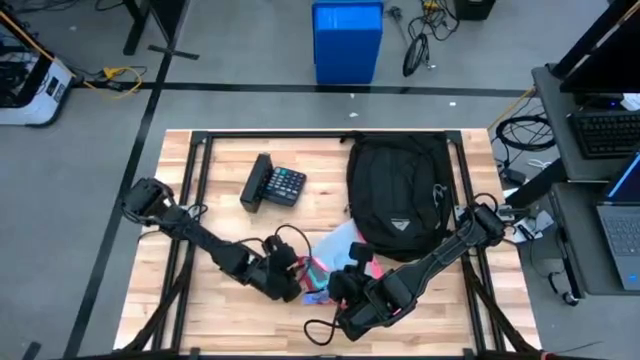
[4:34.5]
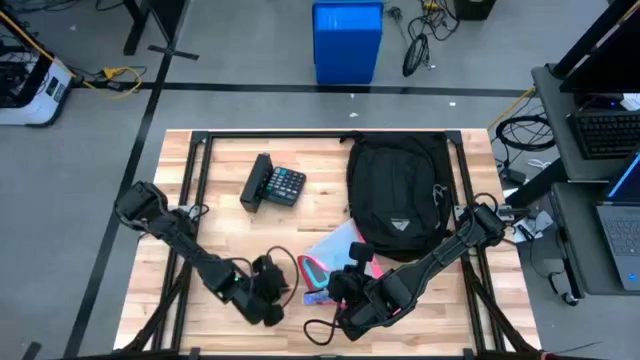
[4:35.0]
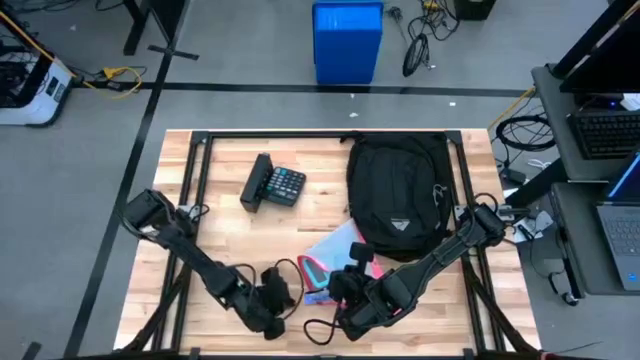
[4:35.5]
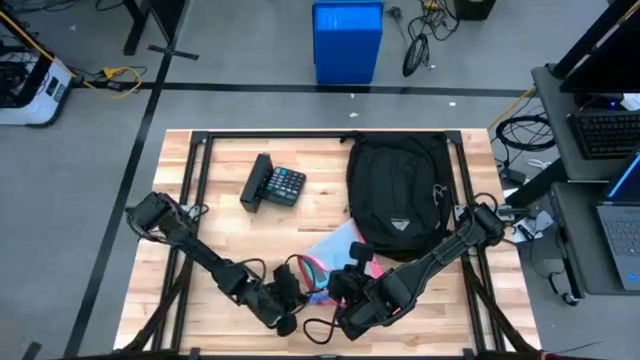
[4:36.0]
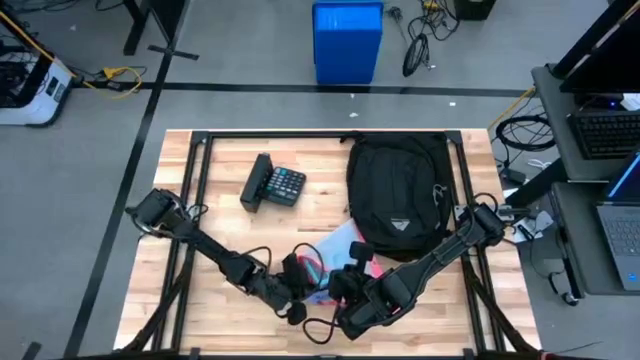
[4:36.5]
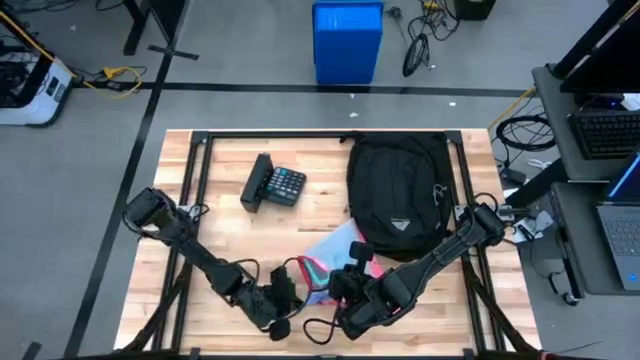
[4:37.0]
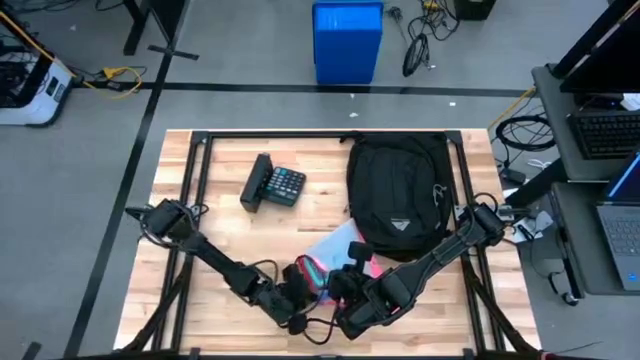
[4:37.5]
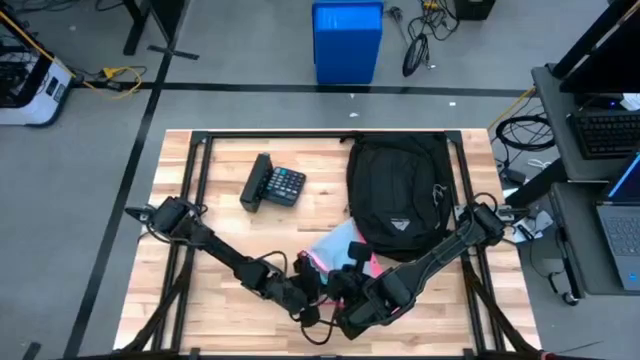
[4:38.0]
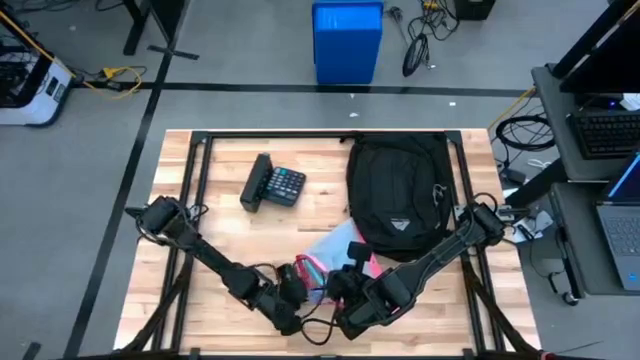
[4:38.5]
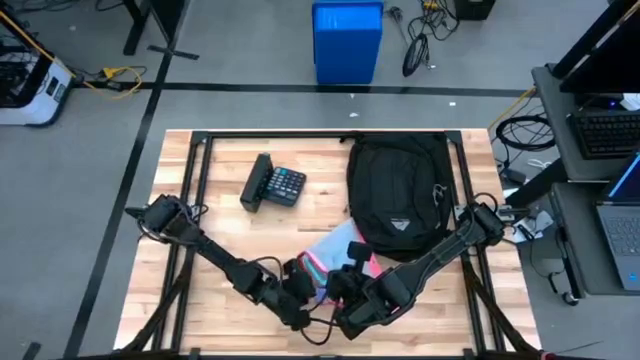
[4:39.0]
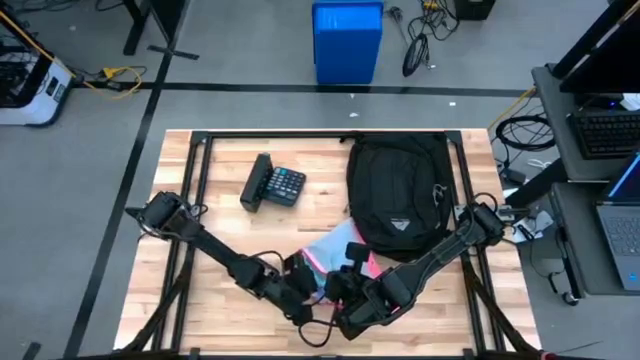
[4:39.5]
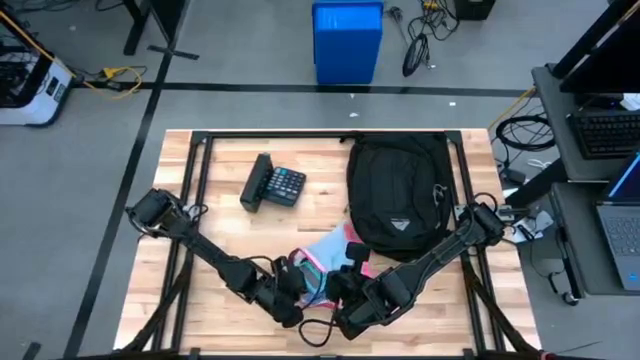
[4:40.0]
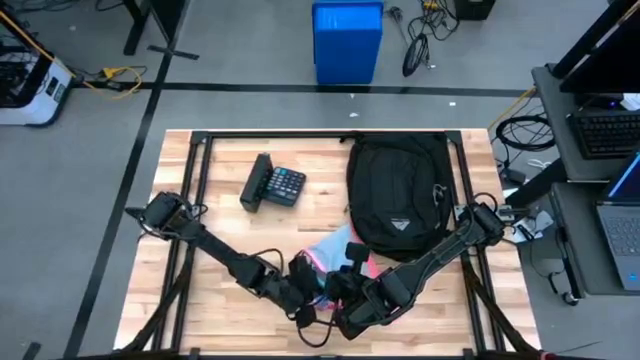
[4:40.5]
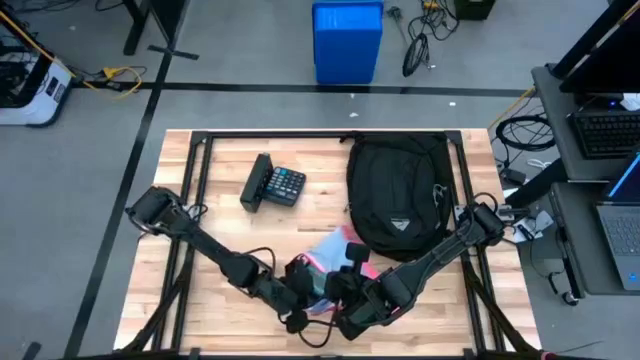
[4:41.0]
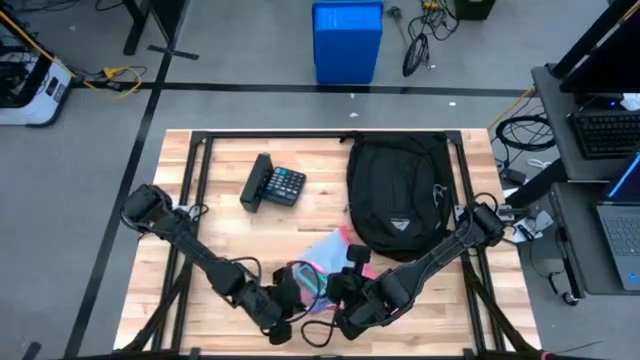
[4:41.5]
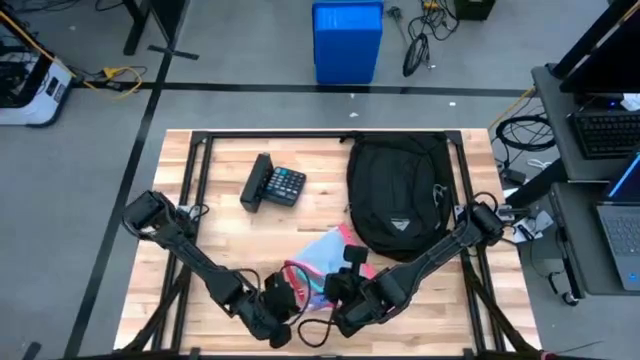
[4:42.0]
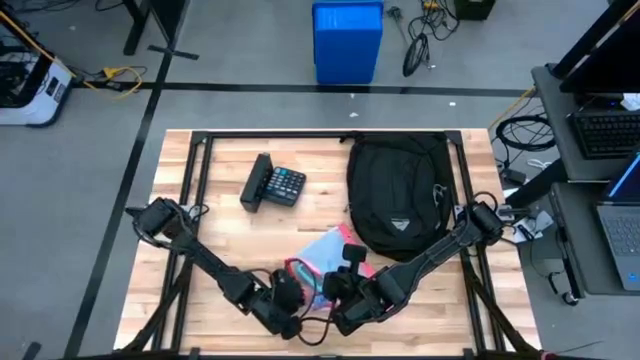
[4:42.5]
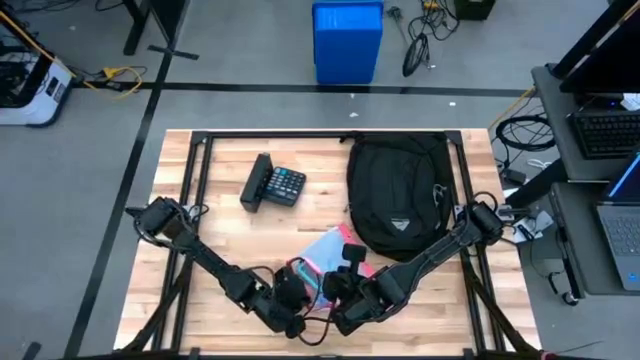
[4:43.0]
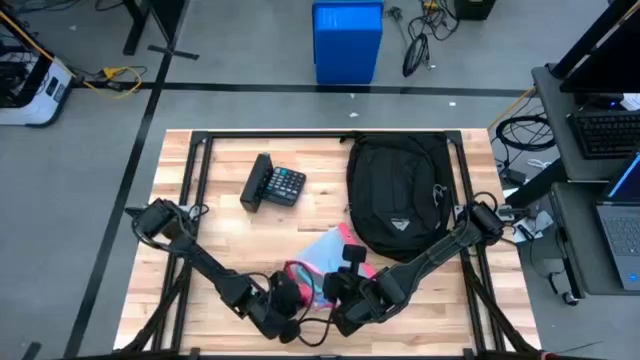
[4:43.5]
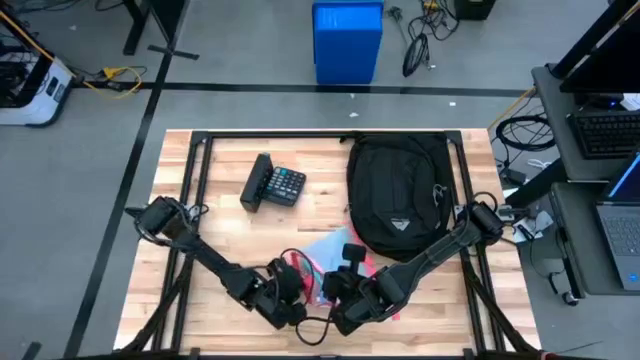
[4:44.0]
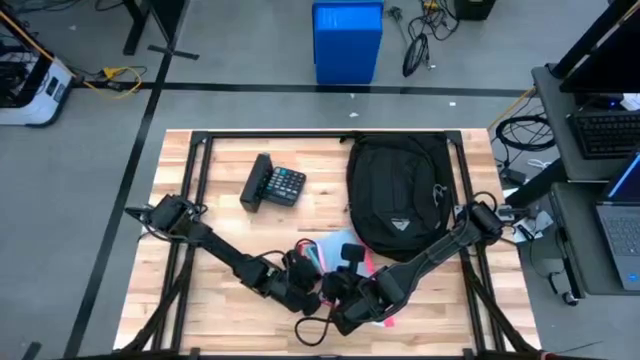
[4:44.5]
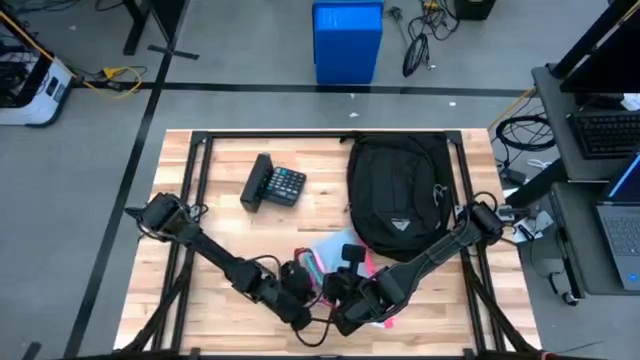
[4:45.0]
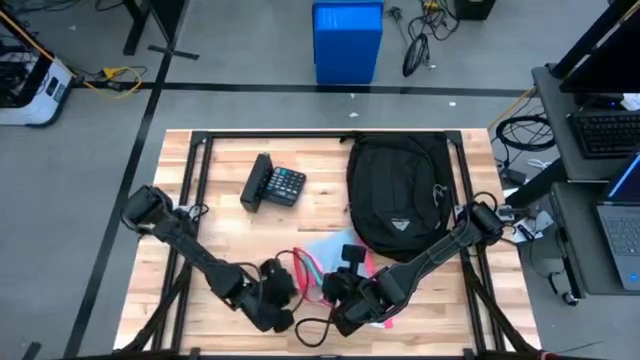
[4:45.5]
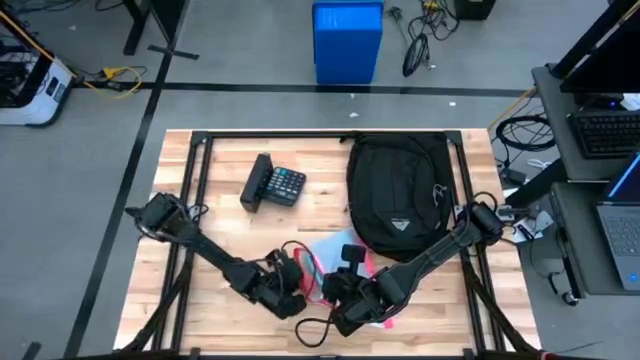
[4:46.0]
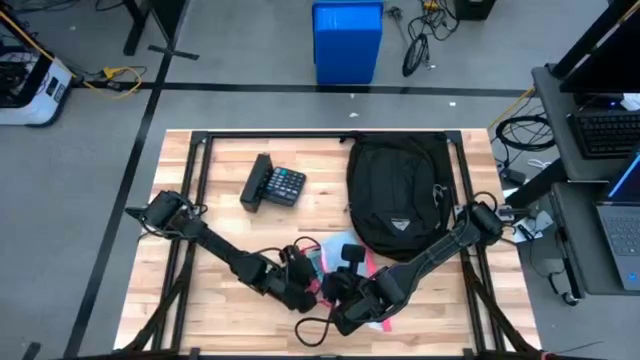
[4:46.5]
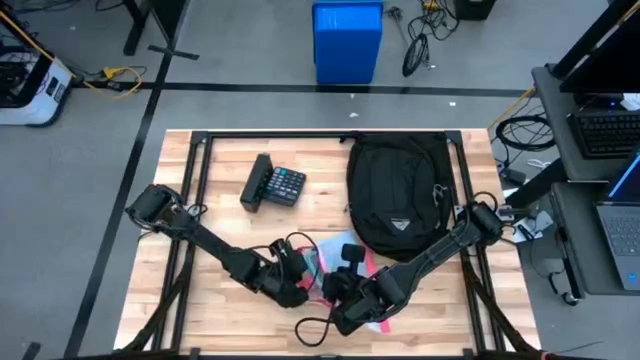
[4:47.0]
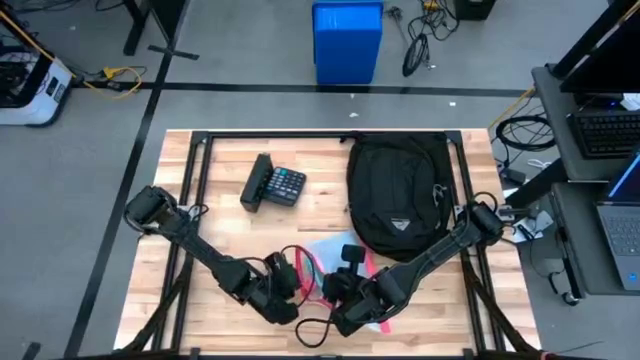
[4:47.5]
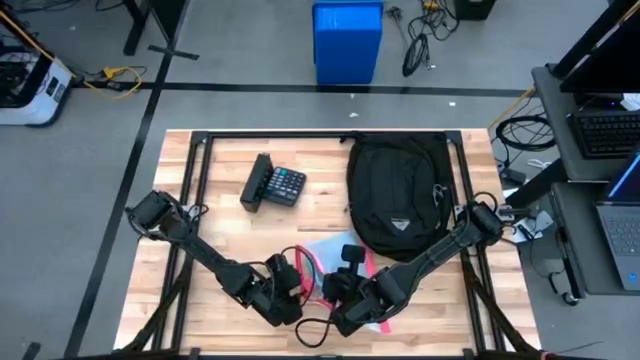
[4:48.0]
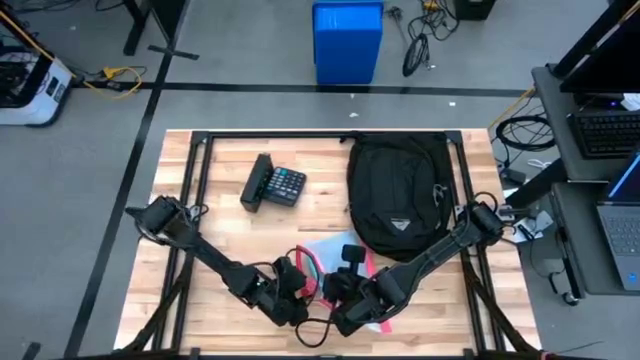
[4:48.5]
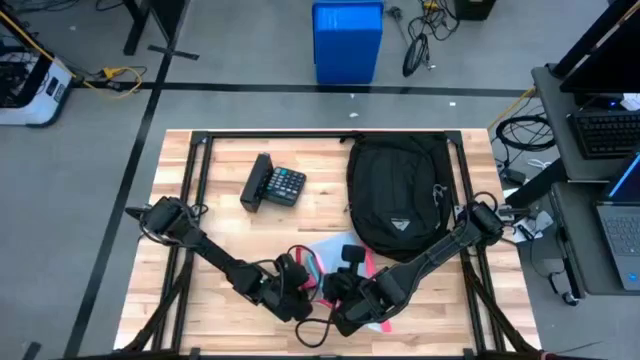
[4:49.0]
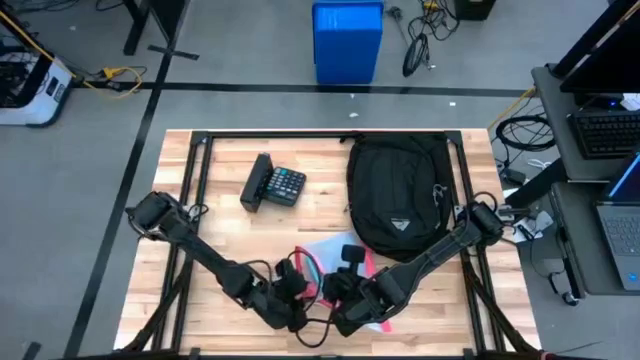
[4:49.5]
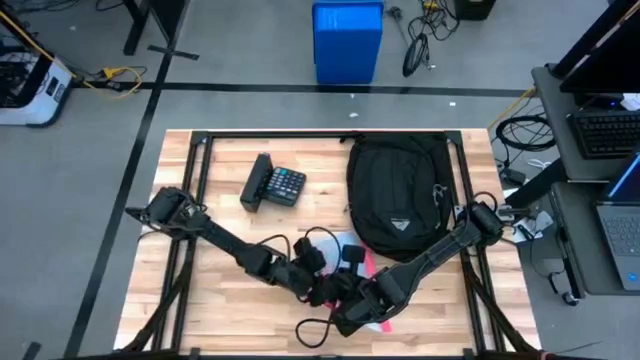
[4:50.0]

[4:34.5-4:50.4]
Task: Unpack backpack
Adjust the items in the white zip bag

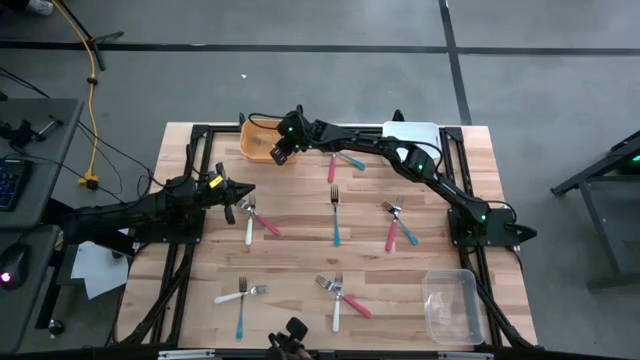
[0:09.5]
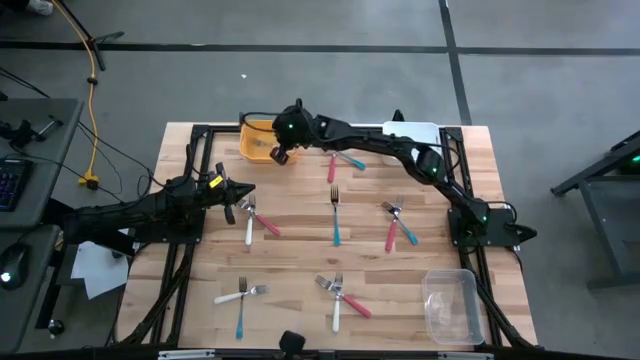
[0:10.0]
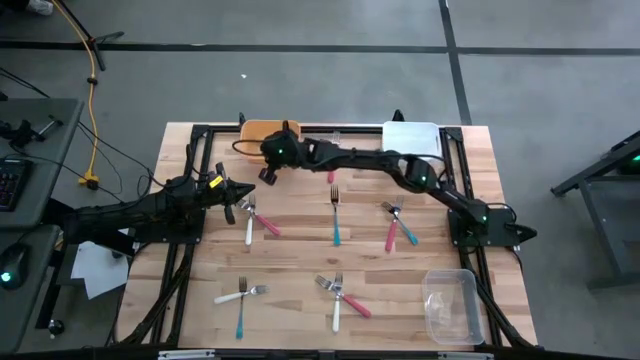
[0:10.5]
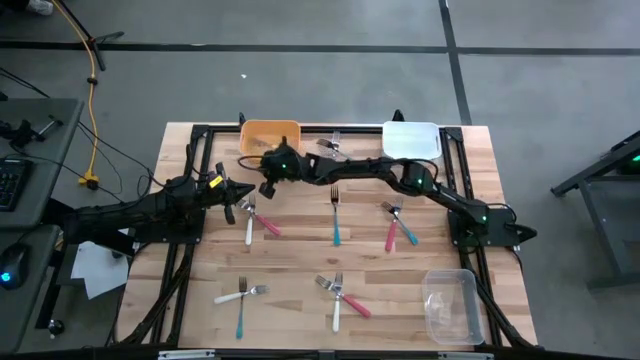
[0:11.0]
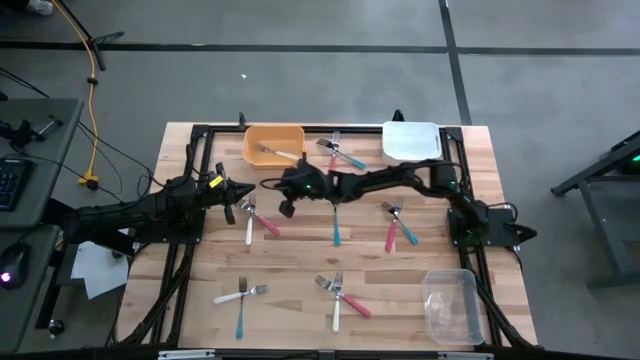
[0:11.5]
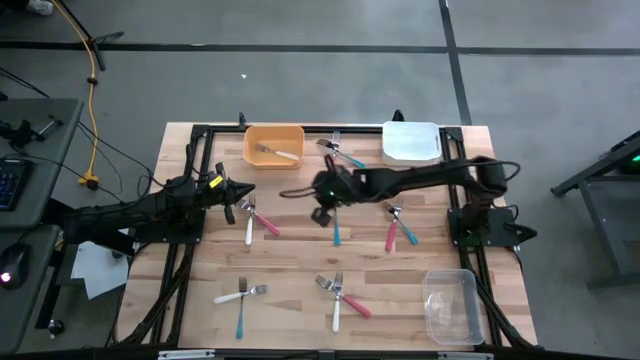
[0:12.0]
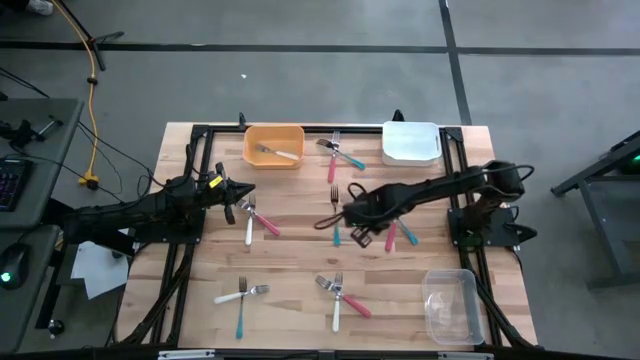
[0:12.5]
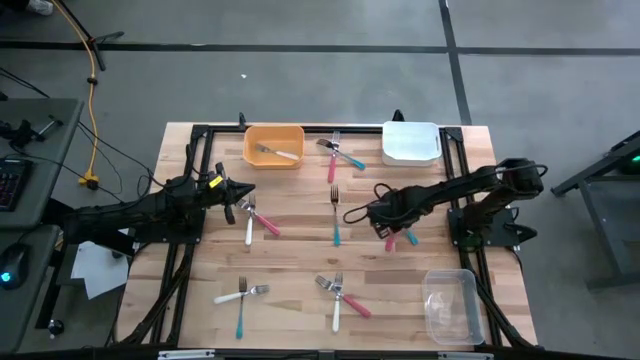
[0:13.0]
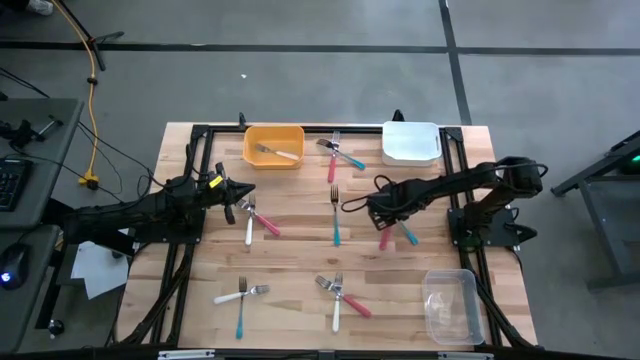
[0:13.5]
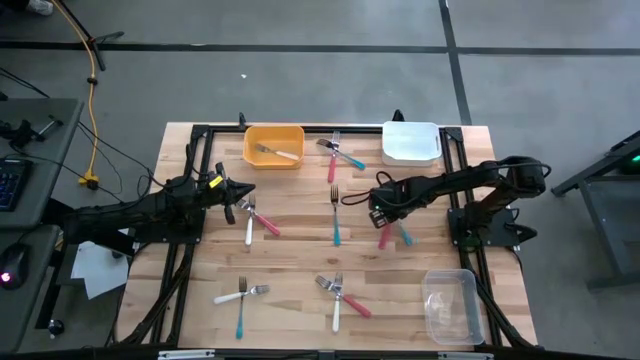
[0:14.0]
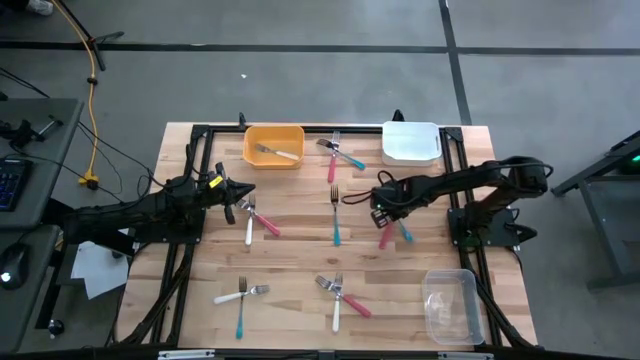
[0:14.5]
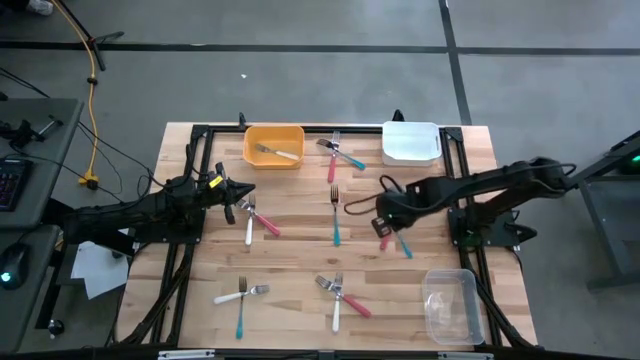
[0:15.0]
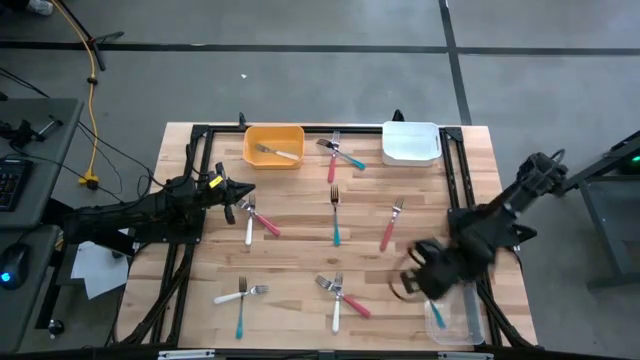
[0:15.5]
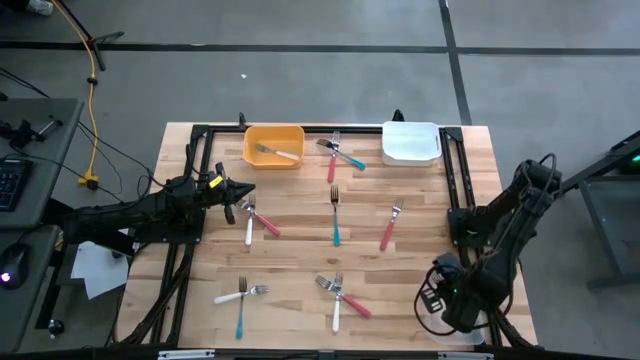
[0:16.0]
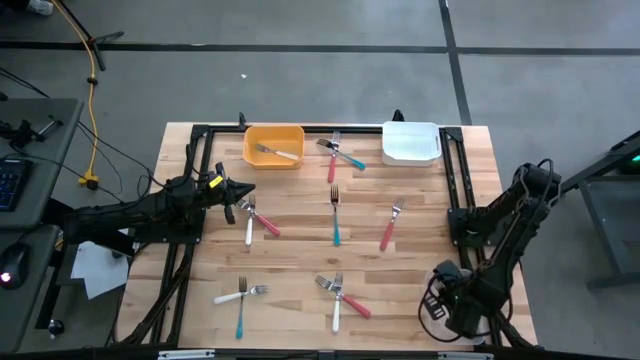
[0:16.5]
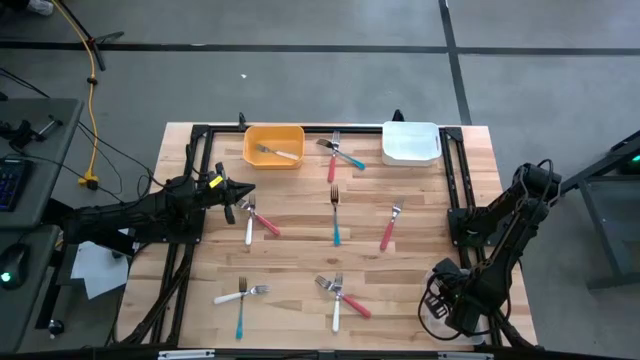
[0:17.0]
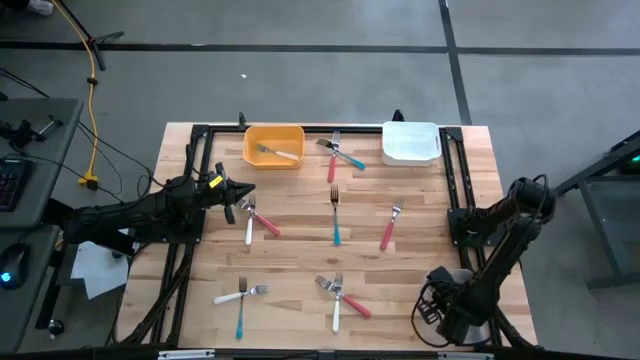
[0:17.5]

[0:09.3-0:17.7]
Task: Sort silverware by color (type)
Put the middle right blue fork into the transparent bin
